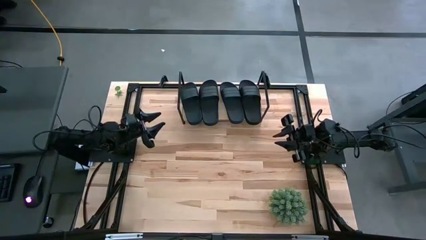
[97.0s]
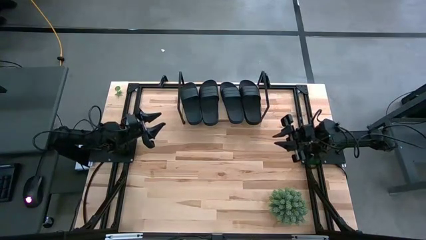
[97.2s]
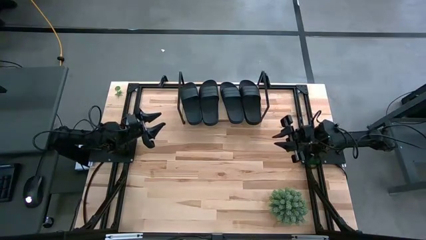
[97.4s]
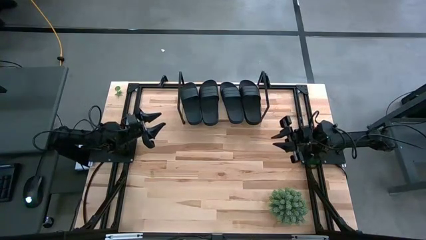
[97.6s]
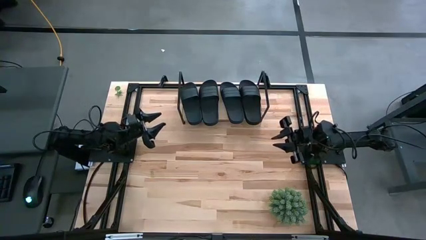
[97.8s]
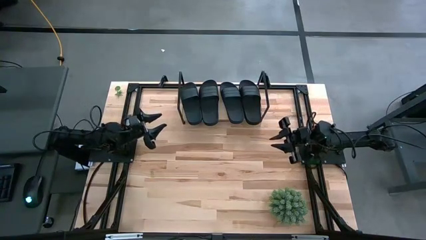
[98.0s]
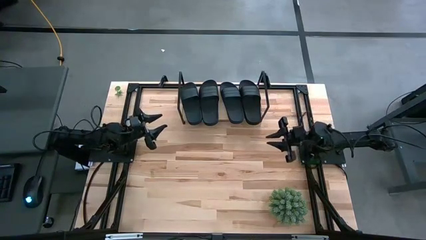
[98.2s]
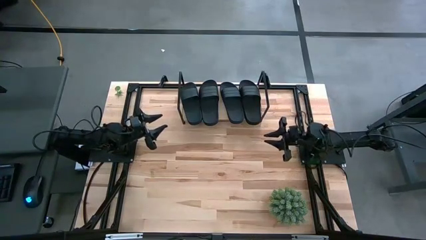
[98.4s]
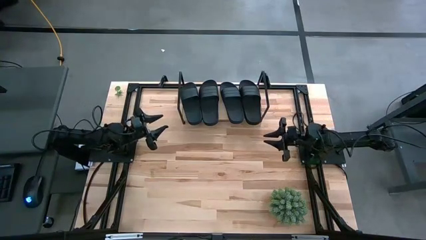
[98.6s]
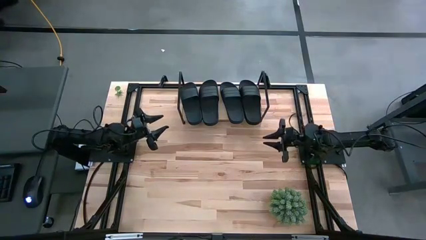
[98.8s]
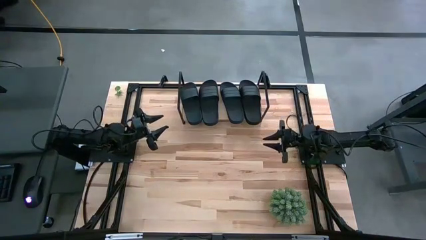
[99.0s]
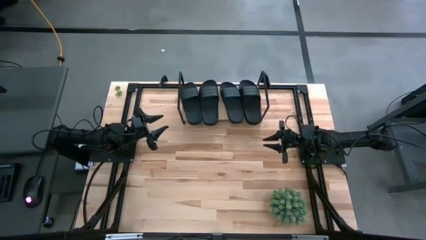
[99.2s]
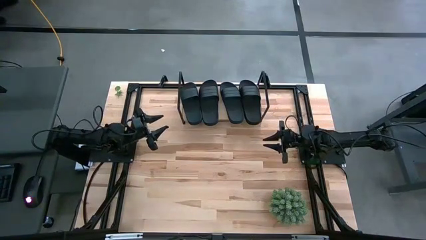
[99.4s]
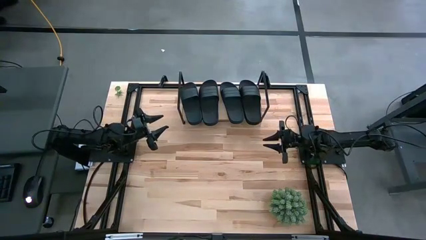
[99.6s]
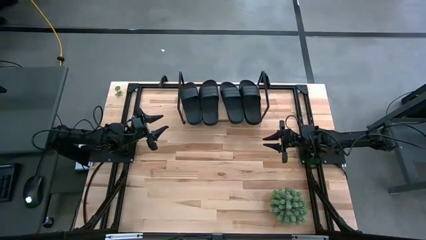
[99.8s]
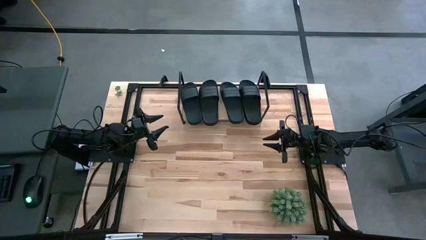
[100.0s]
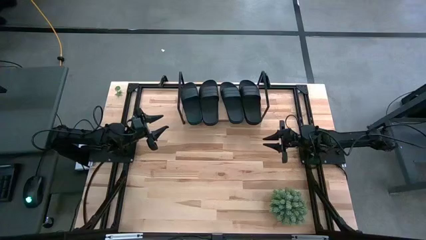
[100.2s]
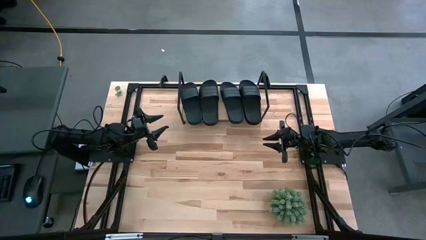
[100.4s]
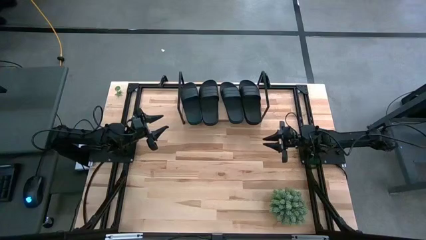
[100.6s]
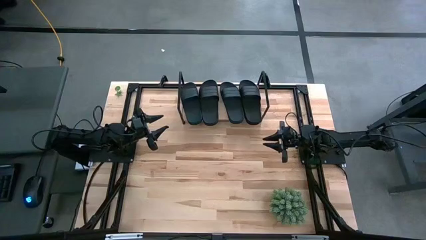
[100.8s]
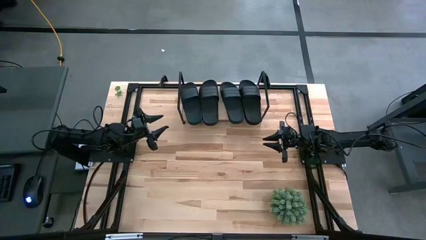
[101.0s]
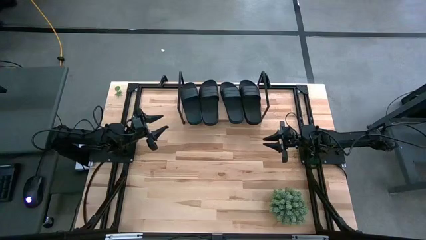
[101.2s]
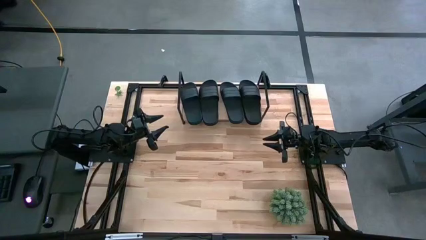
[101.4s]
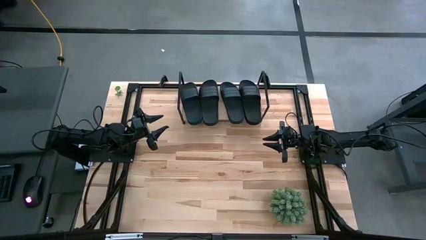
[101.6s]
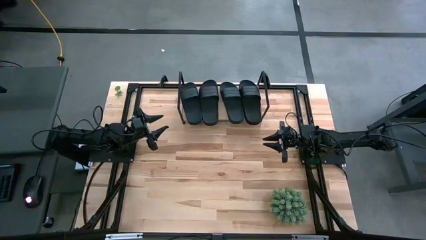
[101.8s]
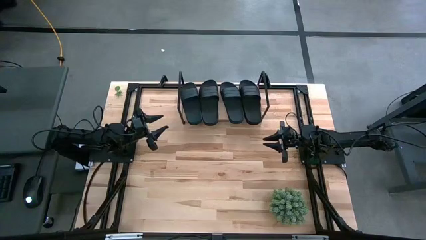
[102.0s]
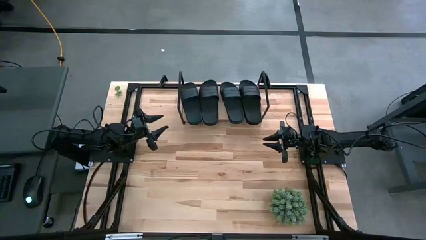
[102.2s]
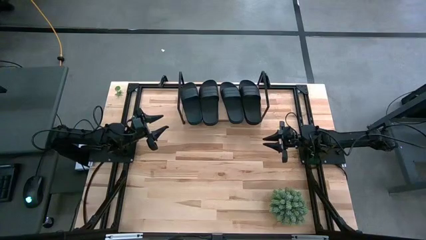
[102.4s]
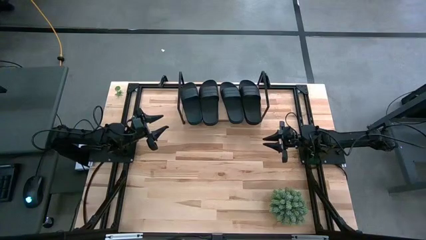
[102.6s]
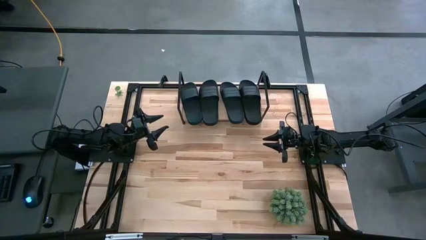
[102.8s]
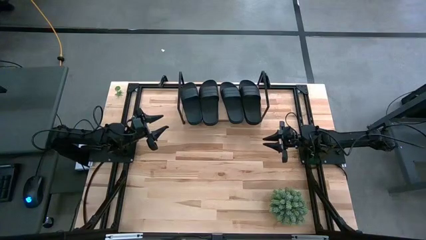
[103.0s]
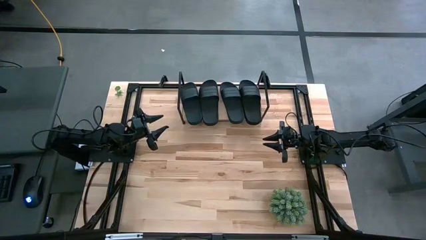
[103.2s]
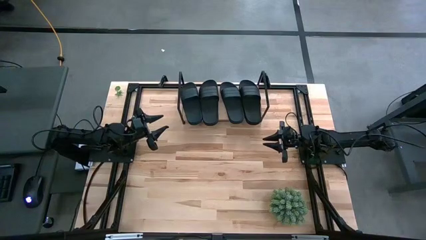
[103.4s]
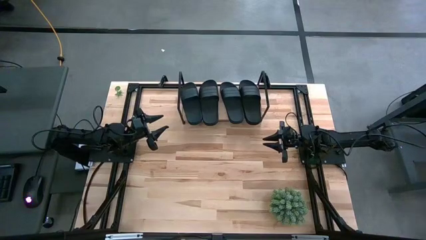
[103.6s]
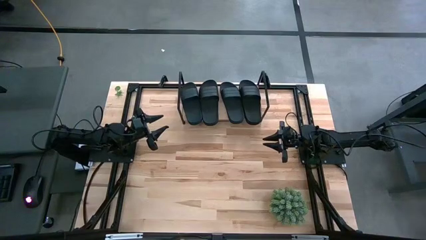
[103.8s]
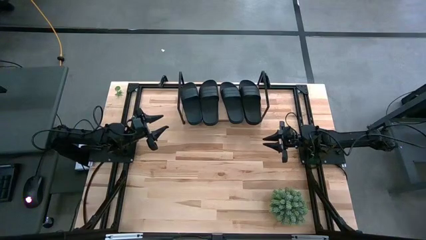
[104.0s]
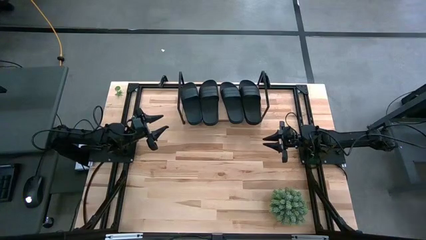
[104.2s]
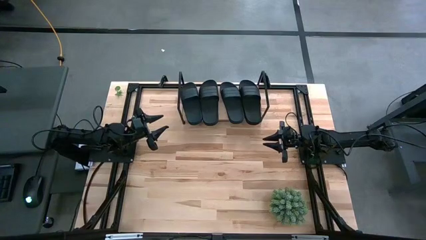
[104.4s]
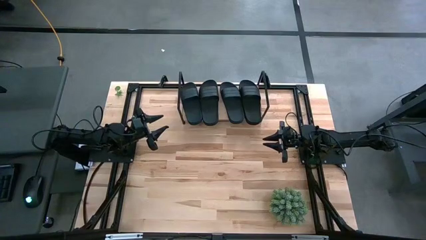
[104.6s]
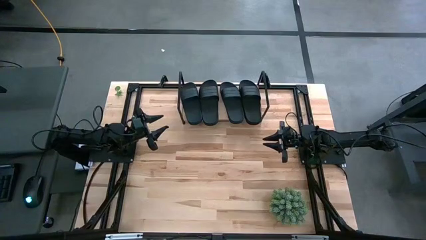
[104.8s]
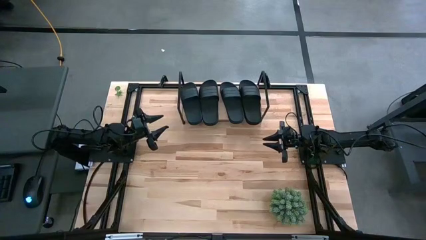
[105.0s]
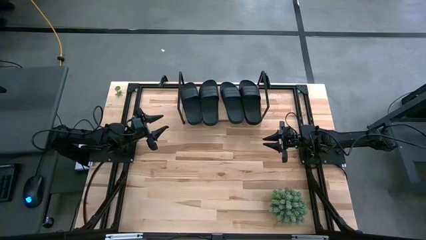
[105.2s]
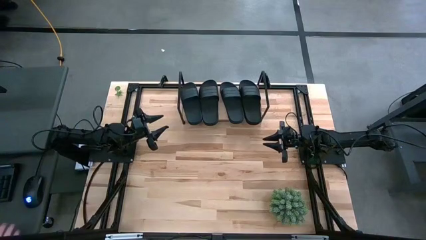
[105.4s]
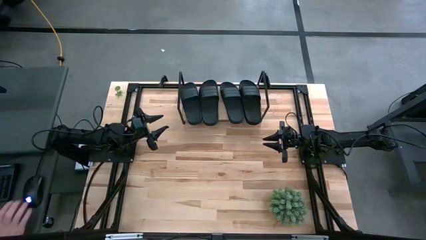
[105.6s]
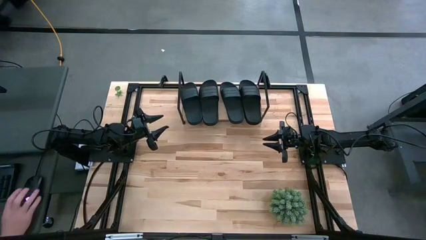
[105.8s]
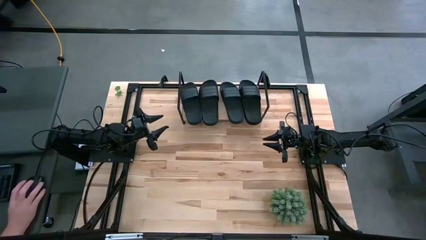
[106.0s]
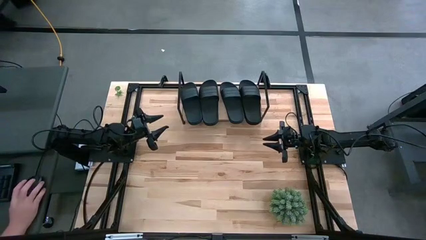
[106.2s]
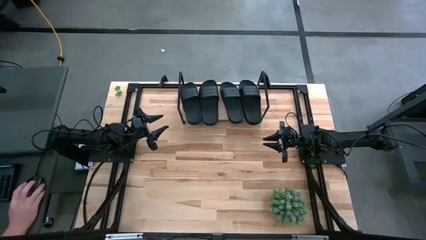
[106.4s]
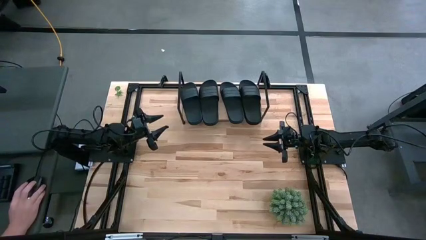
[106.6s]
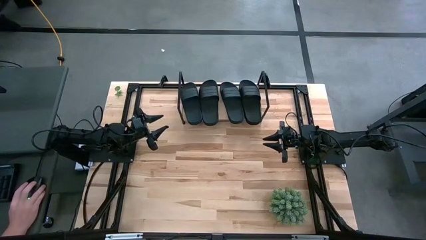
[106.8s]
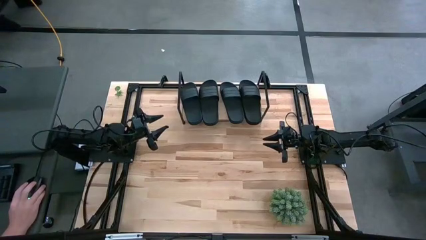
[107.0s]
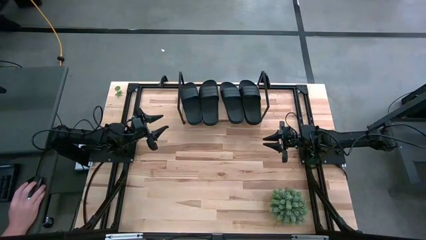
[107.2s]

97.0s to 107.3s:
Task: Pick and place slides into the shelf
Return to Home Position
